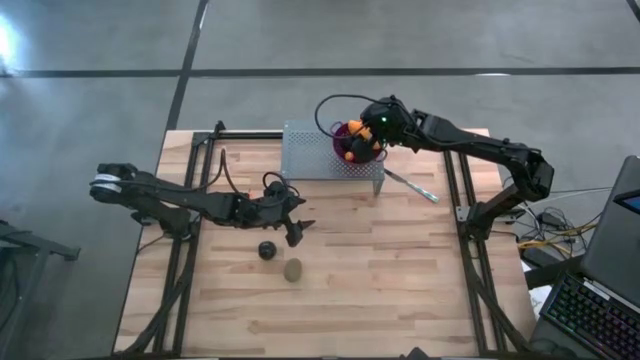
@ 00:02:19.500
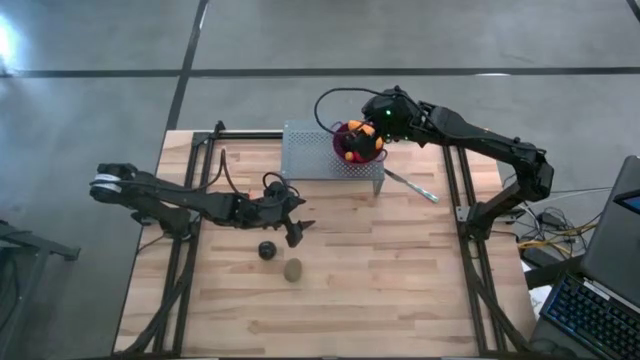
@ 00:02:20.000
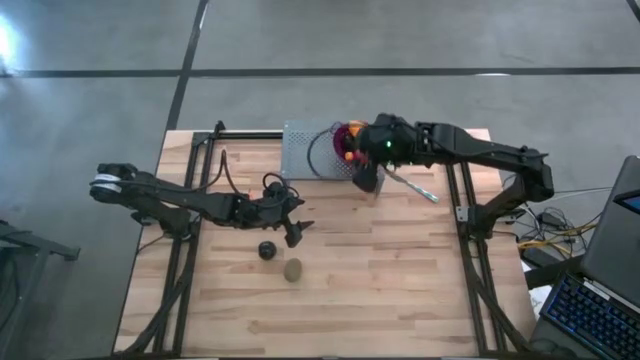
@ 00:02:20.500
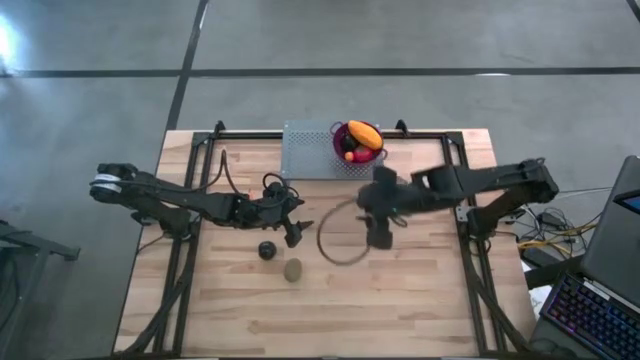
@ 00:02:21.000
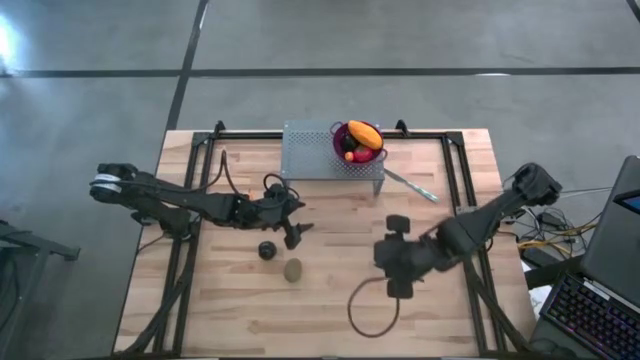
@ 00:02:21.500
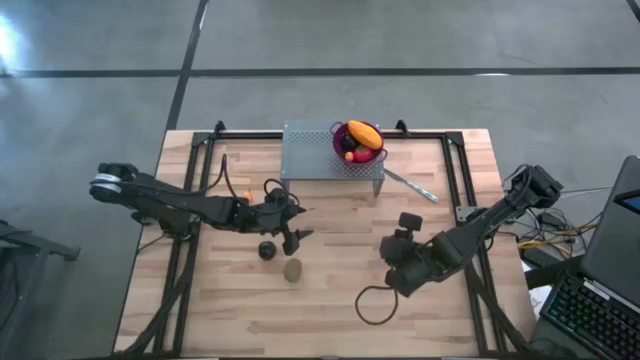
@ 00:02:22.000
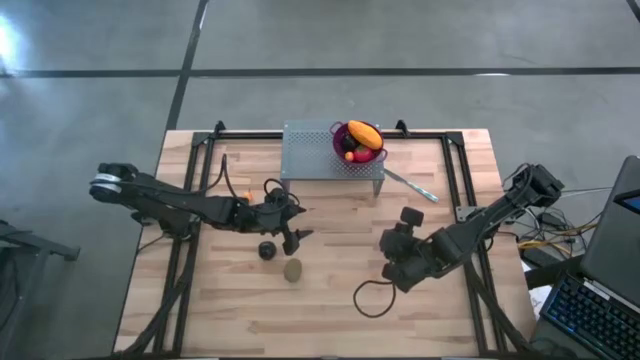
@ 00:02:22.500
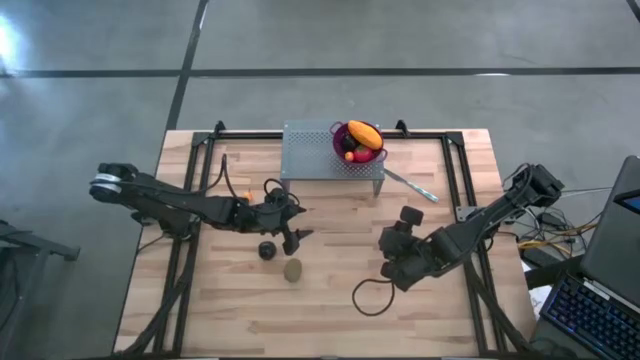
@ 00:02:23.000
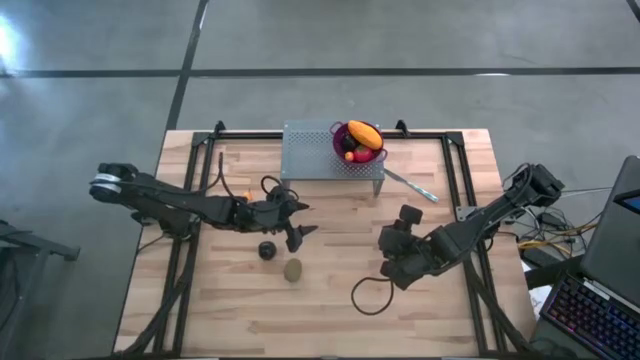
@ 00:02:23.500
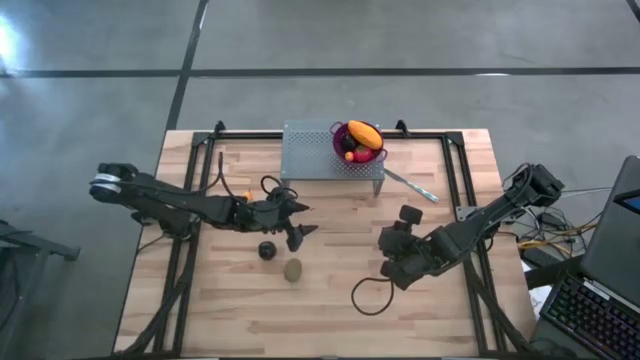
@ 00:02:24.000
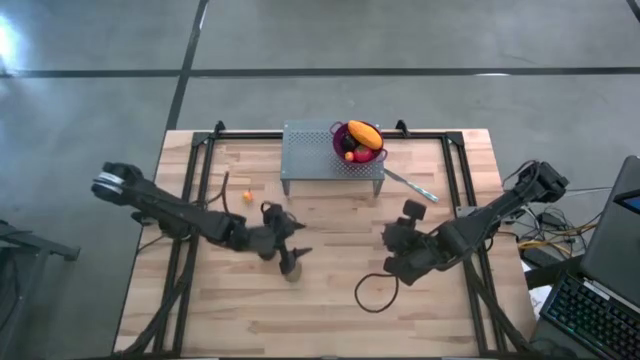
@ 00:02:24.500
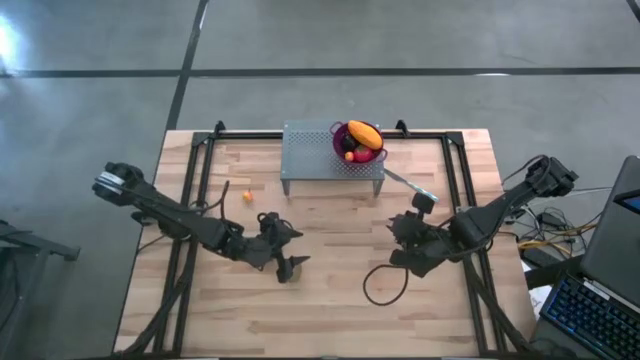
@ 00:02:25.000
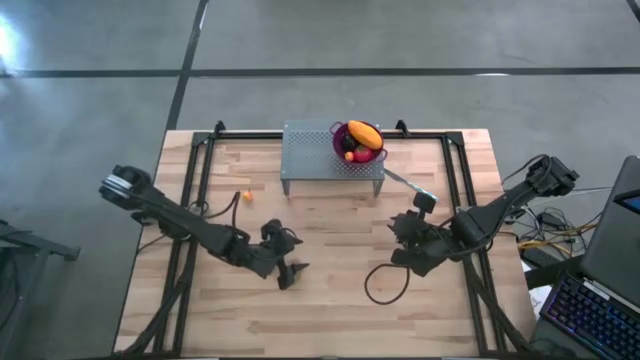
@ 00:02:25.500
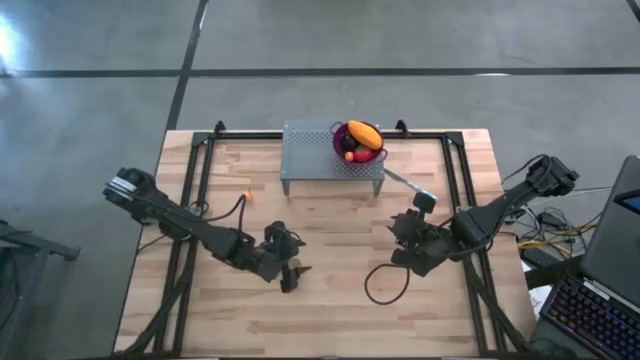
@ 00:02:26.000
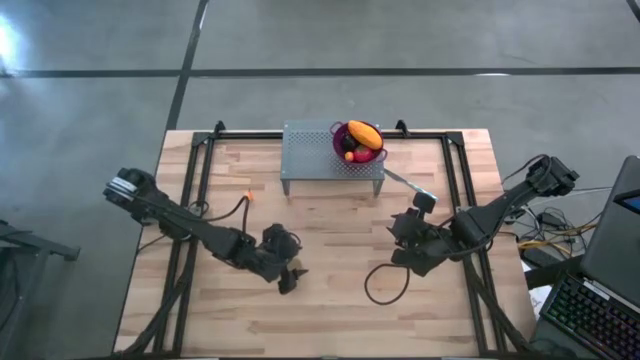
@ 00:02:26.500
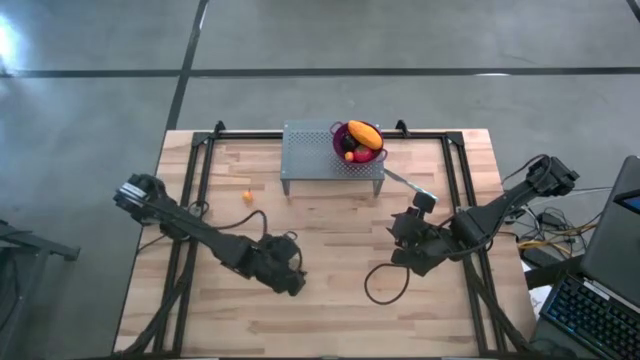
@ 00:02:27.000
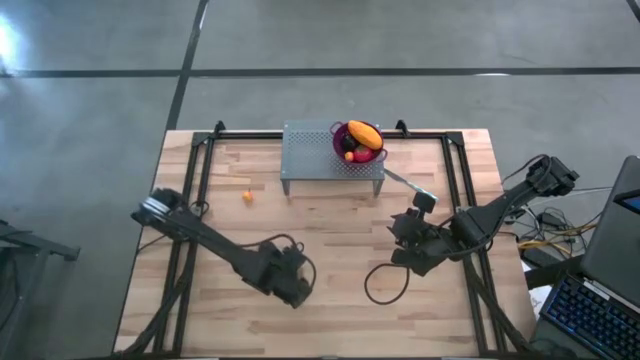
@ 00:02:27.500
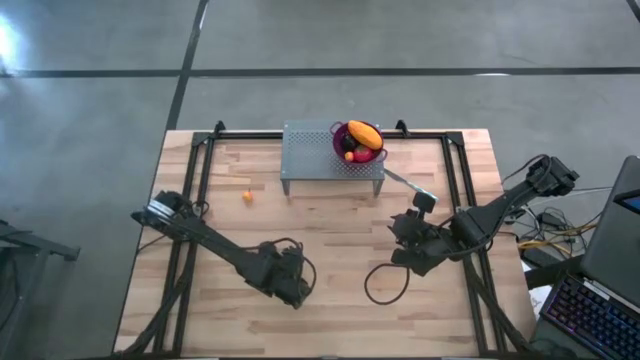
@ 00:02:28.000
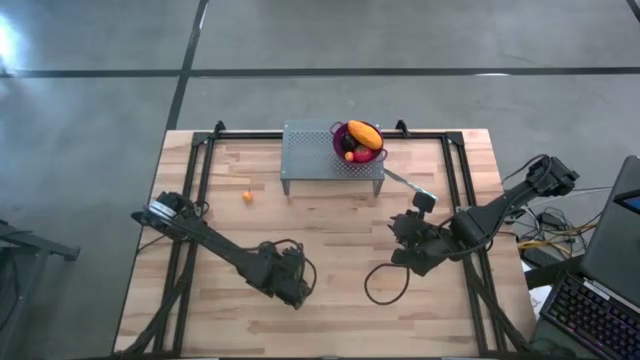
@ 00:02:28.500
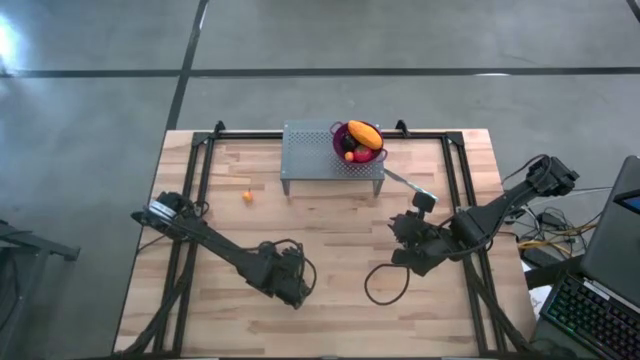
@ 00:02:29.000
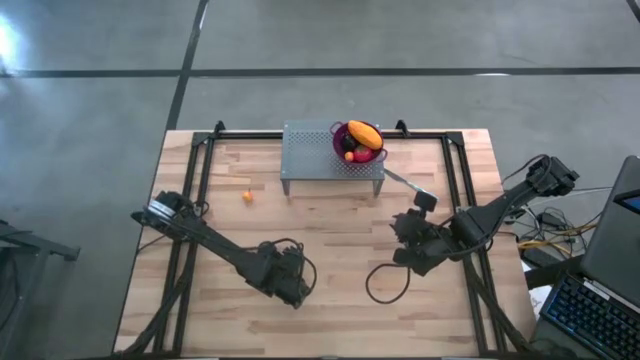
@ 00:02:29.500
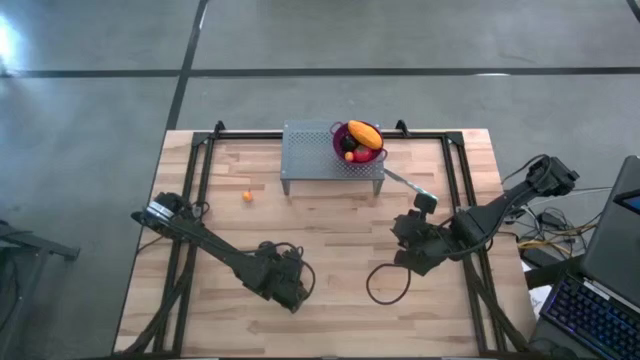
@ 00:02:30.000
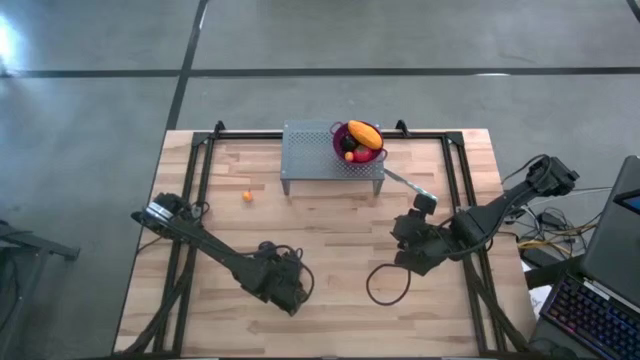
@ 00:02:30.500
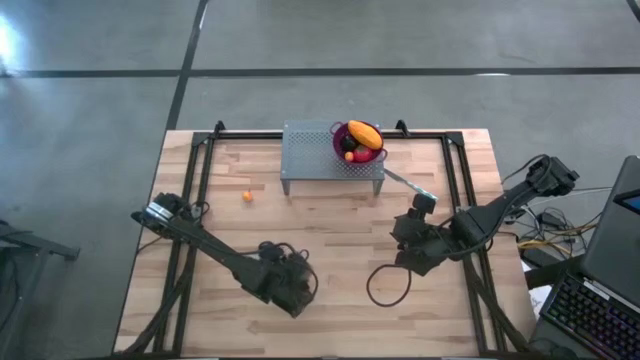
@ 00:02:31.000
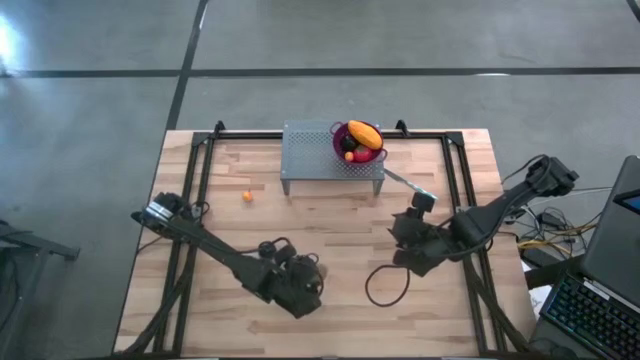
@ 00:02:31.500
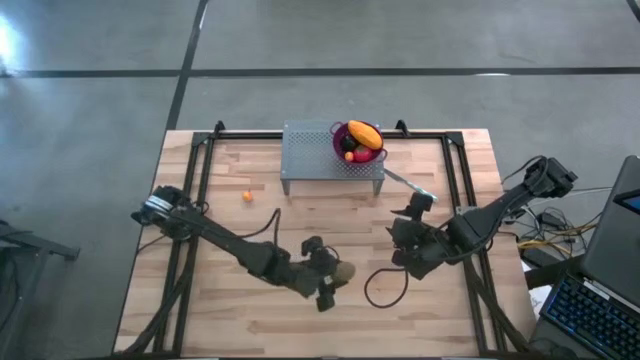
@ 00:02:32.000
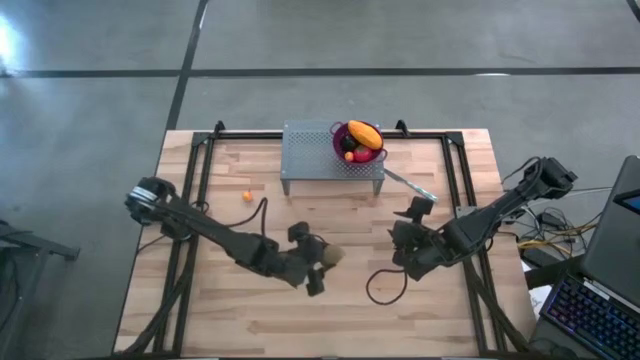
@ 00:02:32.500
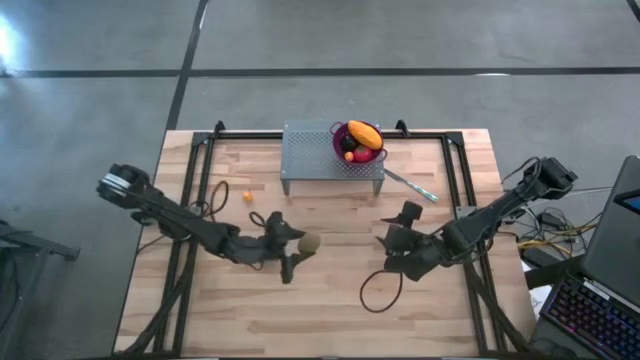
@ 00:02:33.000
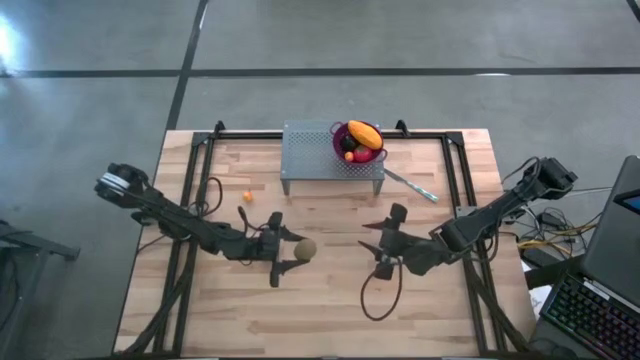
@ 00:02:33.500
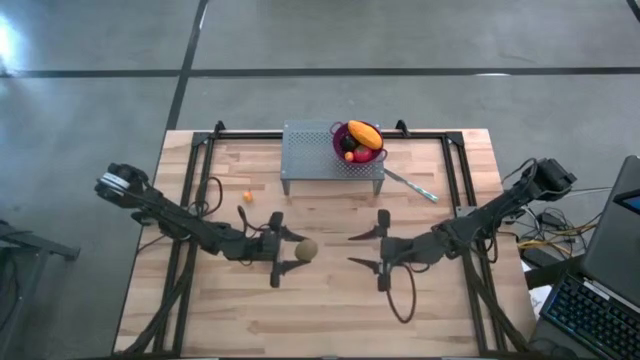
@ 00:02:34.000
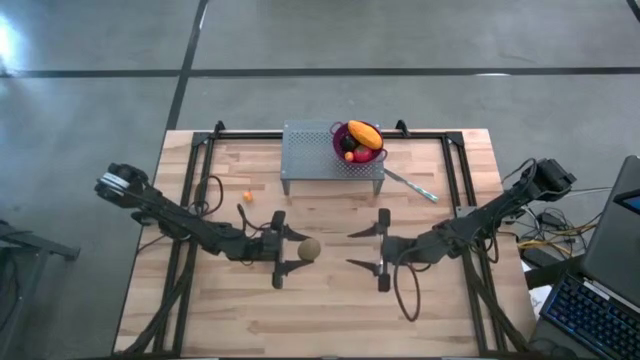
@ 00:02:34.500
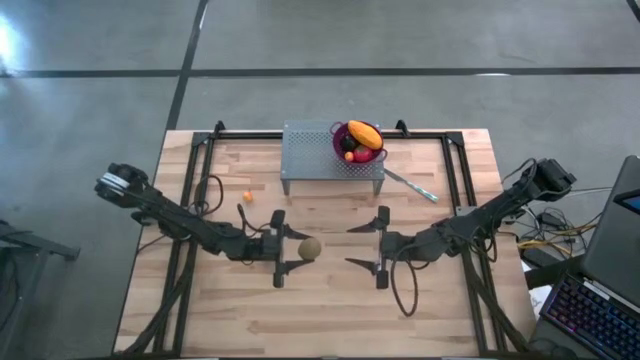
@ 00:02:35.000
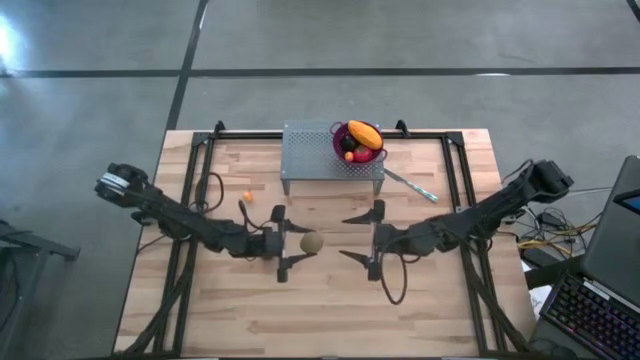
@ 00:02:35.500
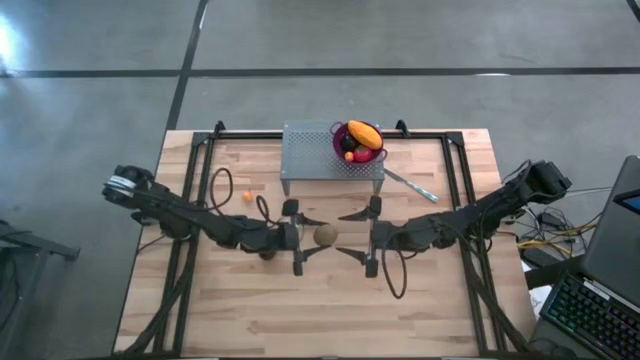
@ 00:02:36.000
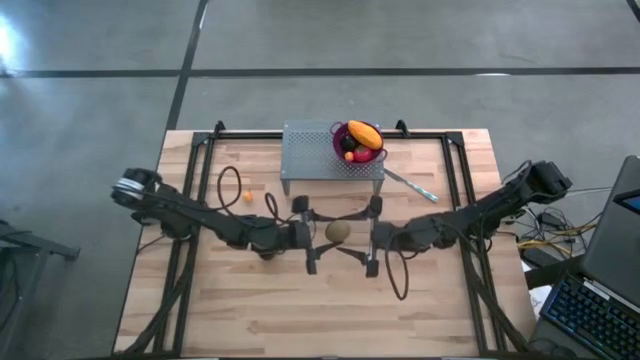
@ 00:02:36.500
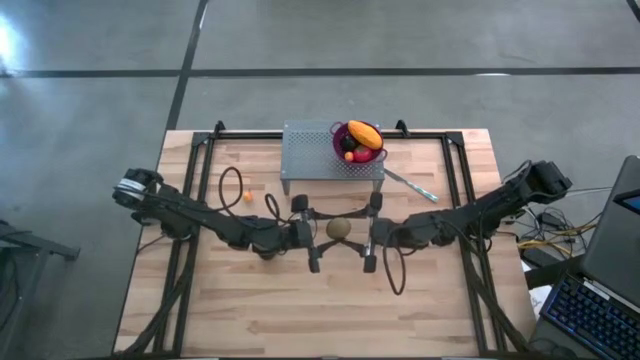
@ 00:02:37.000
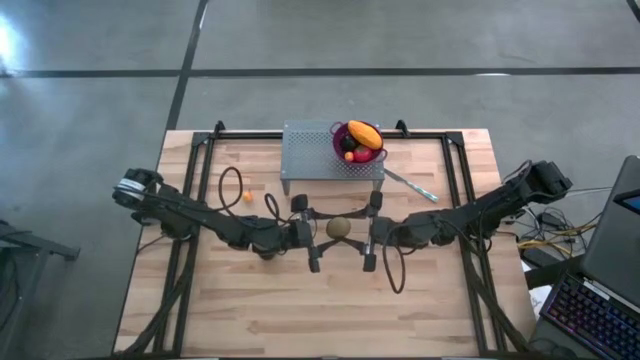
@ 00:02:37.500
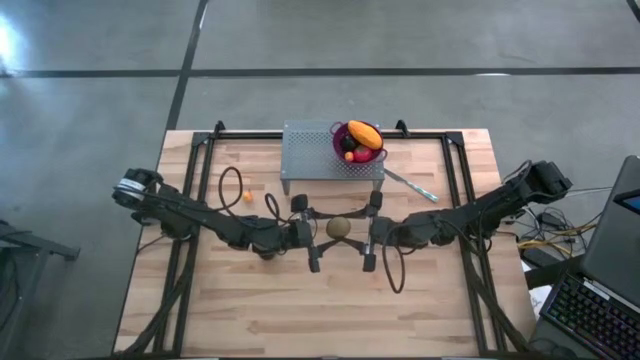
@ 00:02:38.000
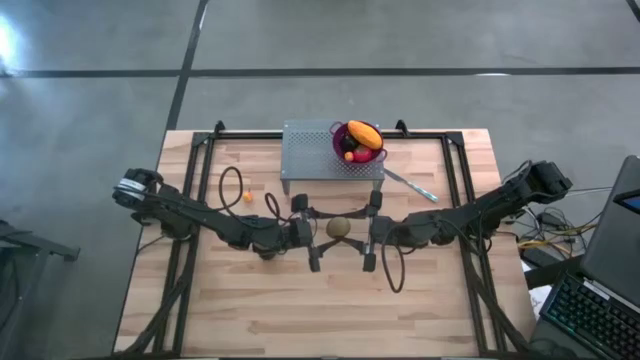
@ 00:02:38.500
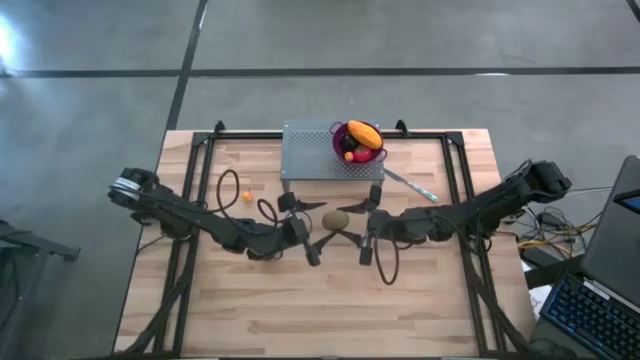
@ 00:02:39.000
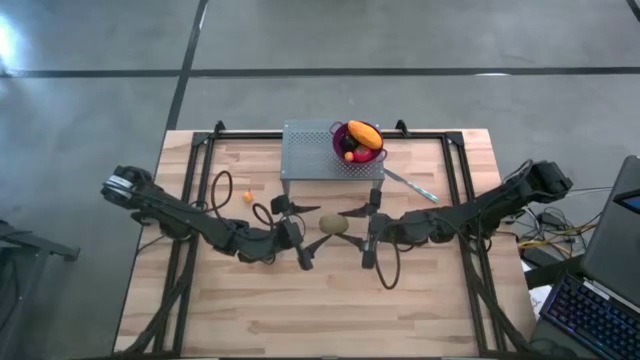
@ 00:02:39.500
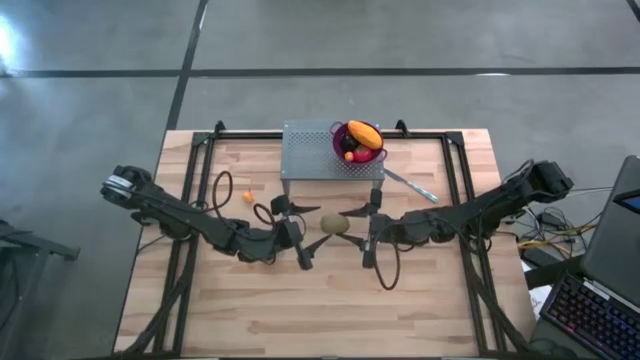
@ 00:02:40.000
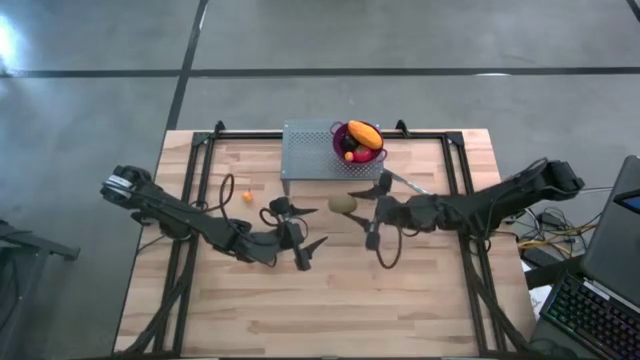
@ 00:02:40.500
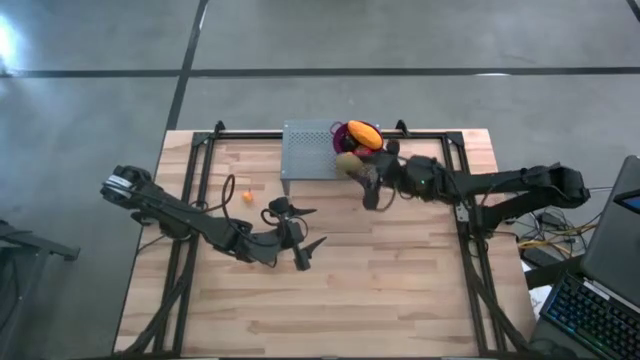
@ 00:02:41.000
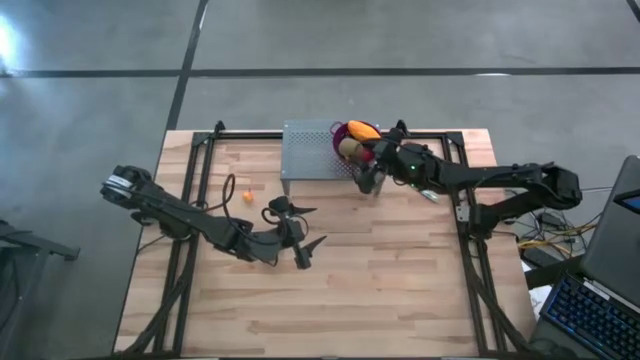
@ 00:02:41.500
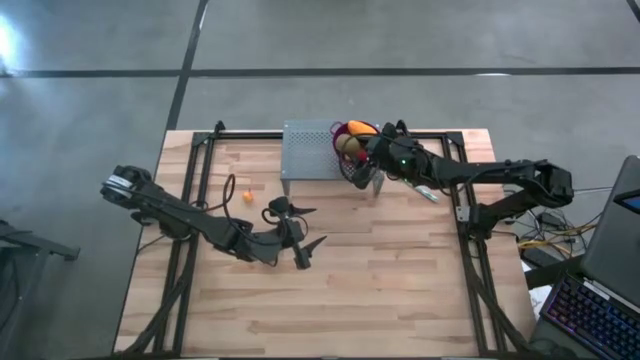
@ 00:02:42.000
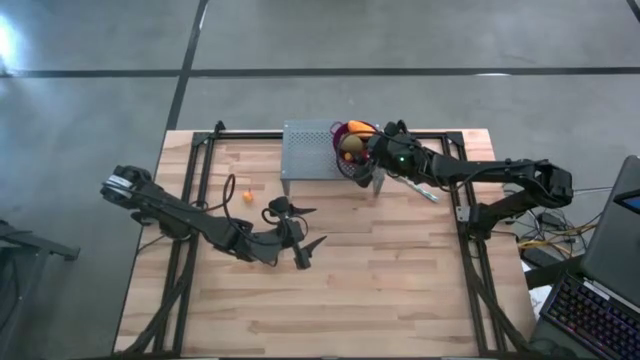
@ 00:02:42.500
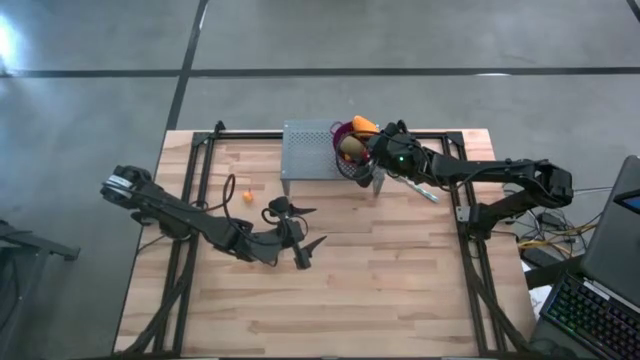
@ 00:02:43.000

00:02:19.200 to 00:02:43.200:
Task: Pick & Place Fruit
Put the kiwi into the purple strainer bowl on the shelf
